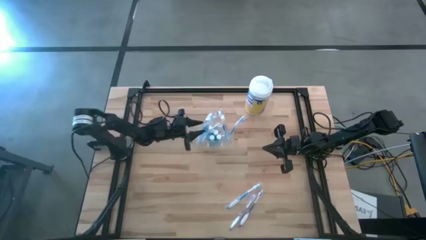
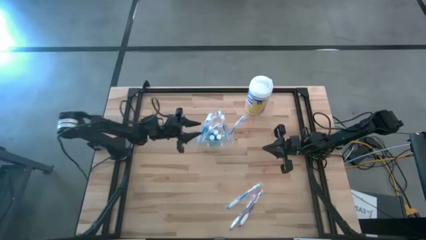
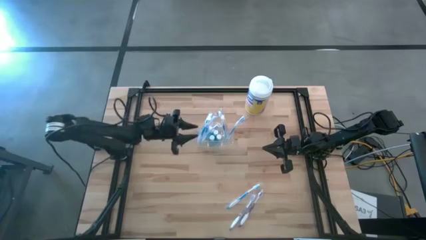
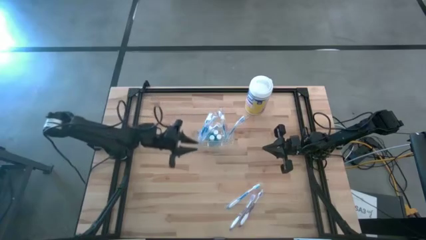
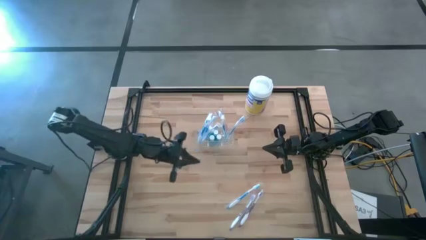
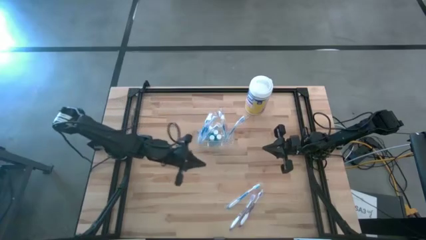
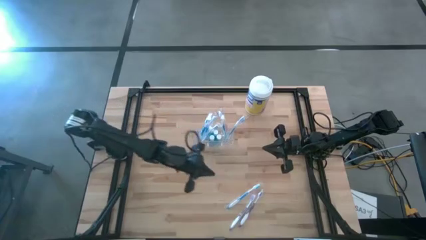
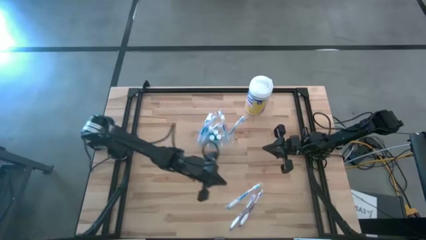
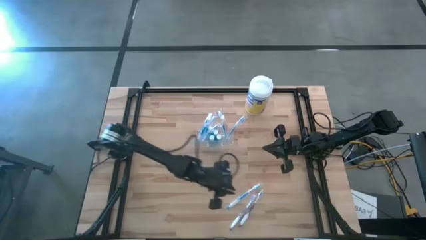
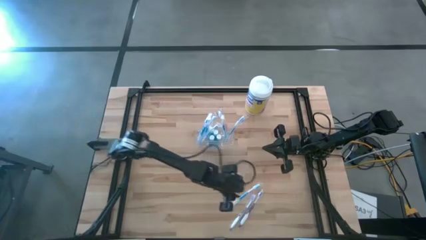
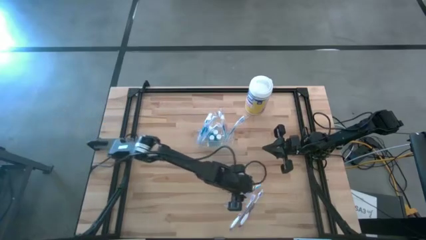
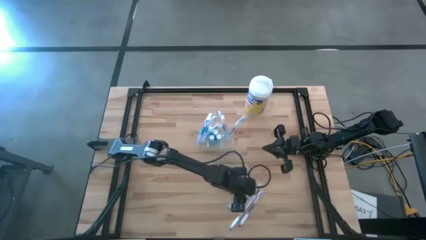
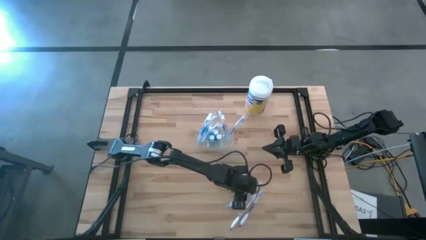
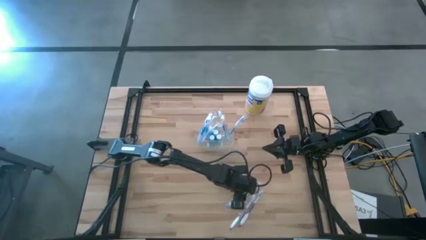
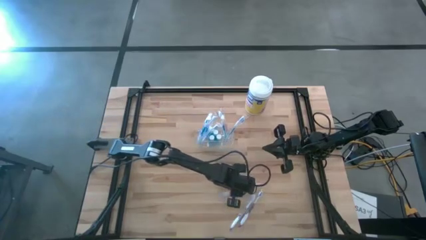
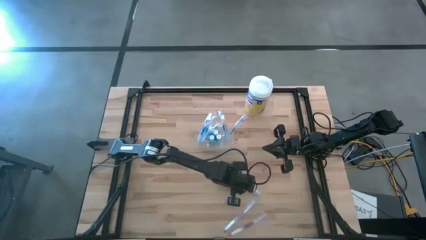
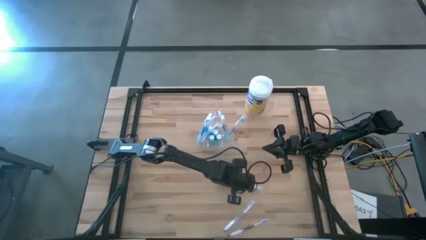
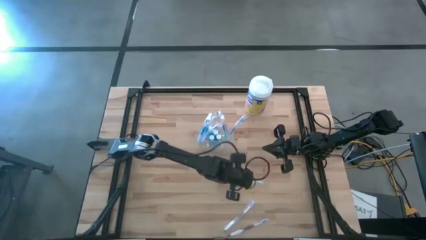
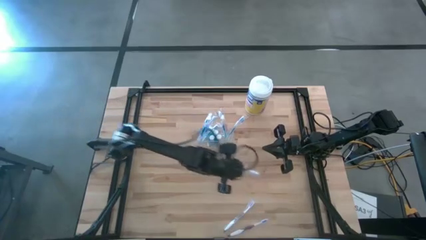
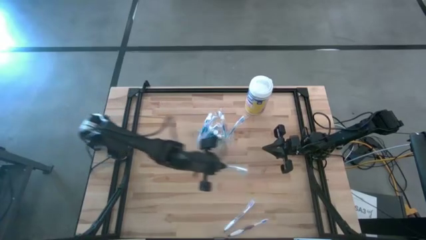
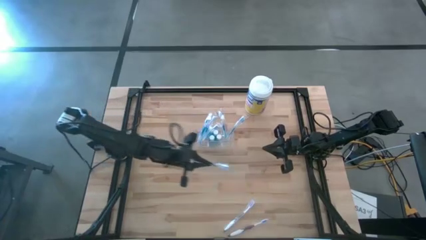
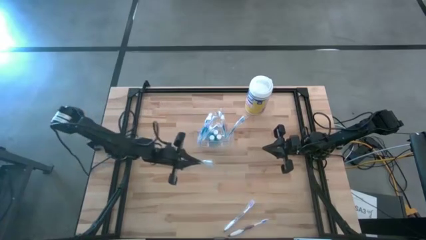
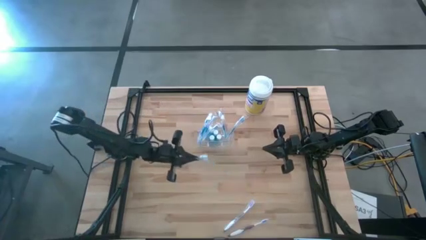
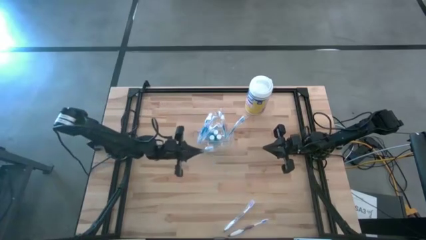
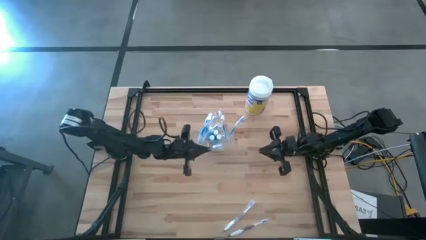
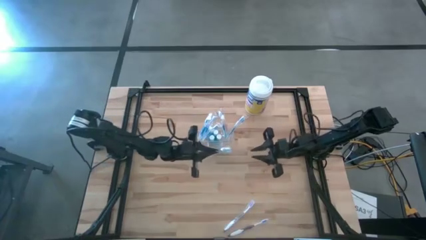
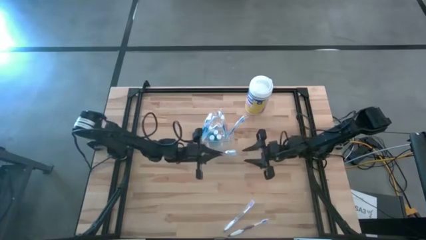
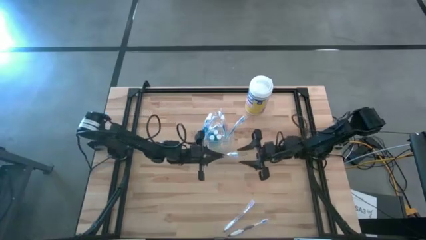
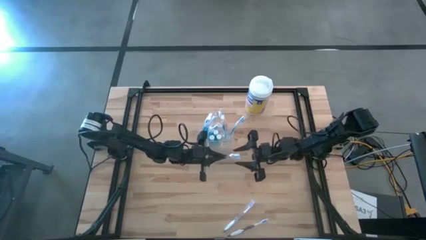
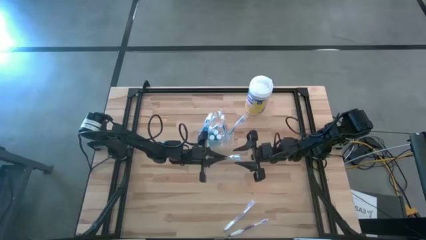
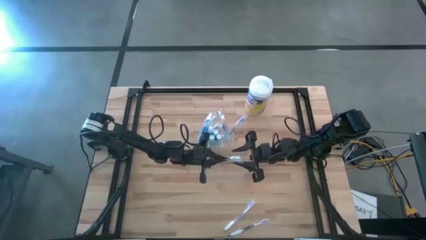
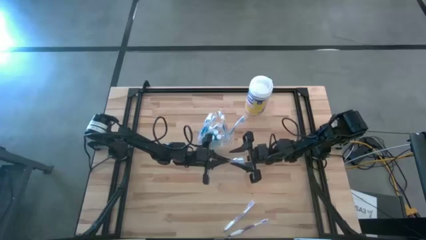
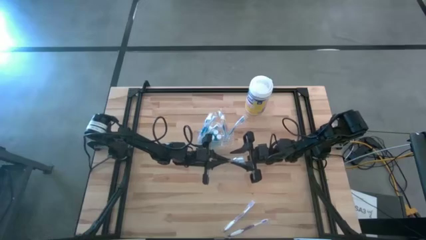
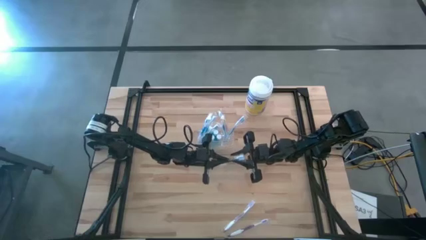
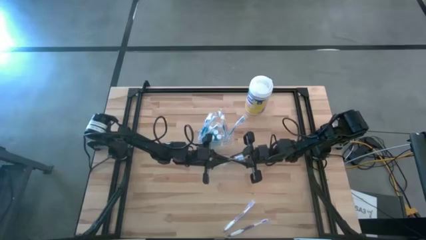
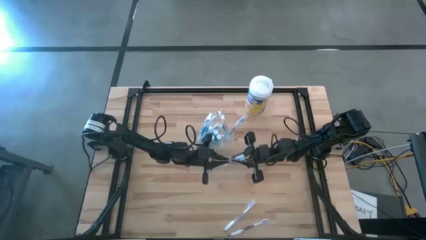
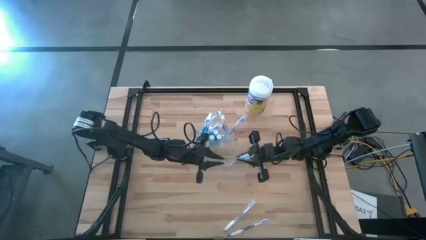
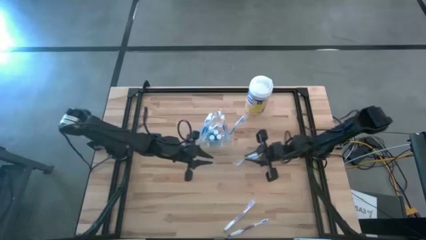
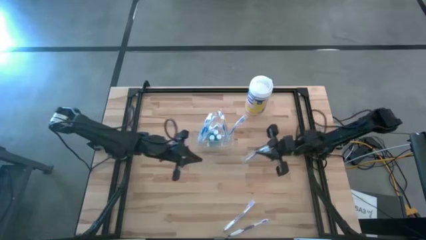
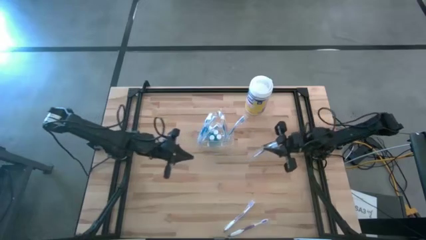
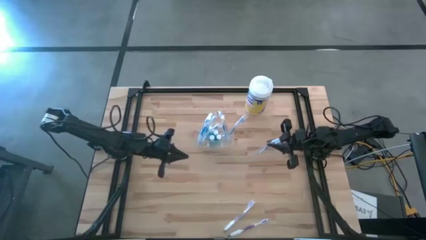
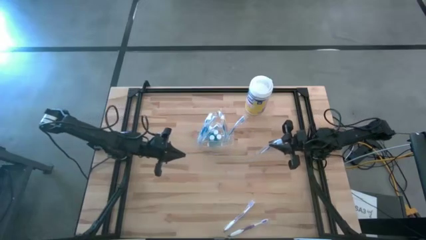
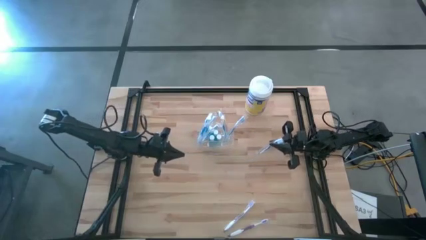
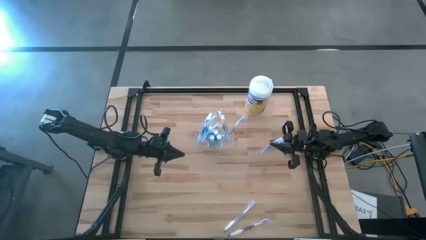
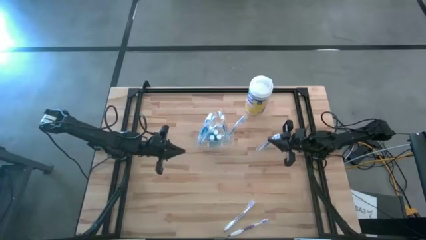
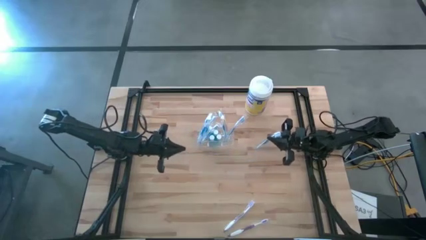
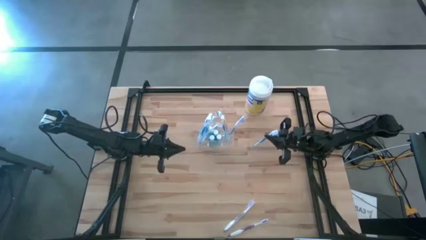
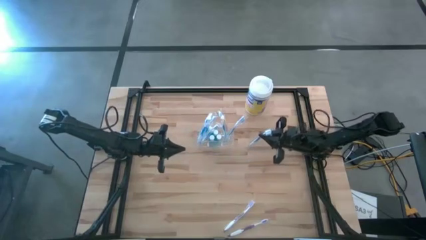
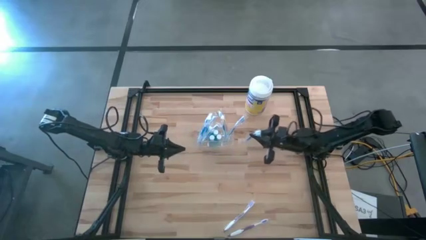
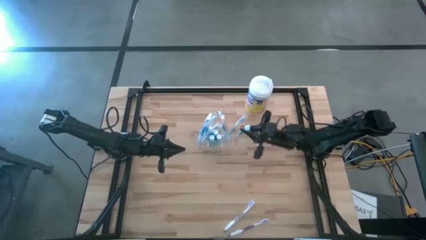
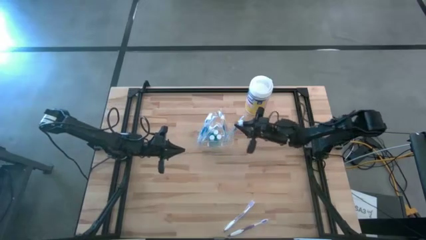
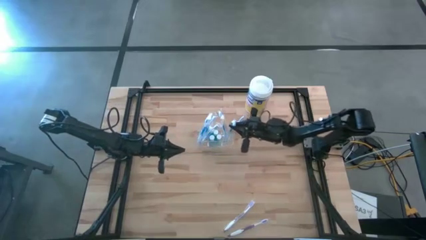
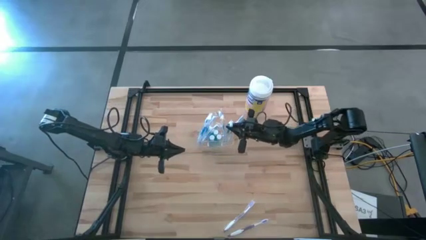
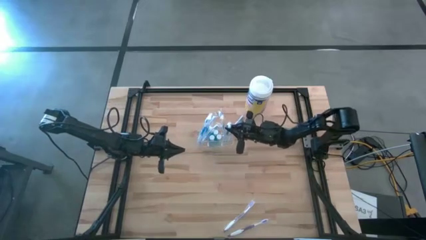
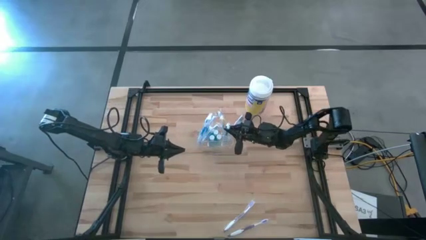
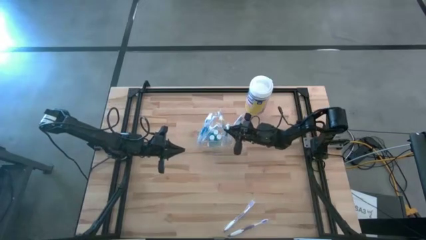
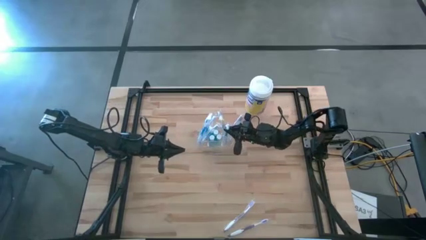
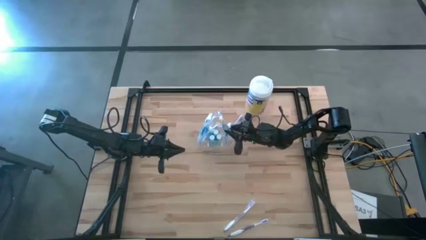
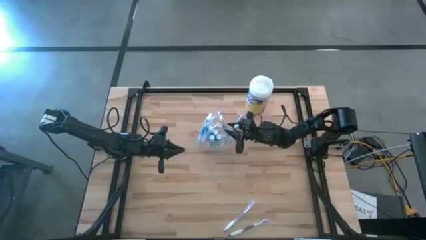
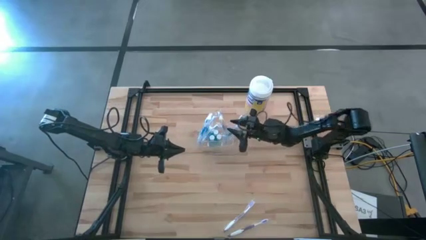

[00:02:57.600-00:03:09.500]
Task: Pick & Place toothbrushing station
Put the blue toothbrush into the transparent organizer
